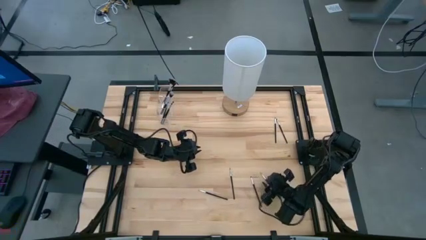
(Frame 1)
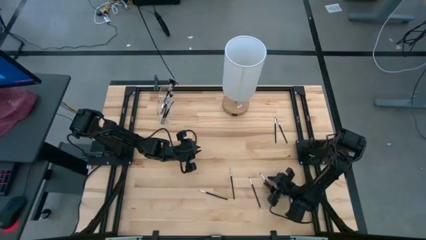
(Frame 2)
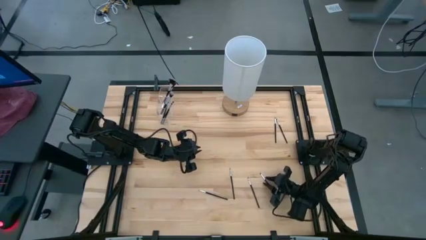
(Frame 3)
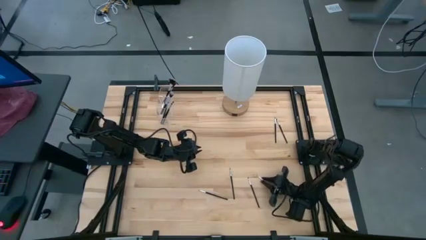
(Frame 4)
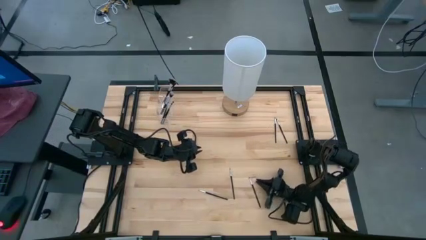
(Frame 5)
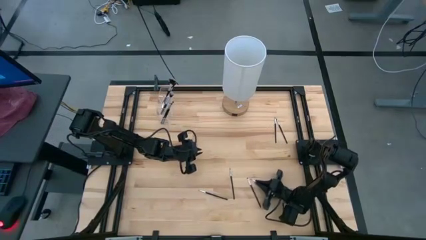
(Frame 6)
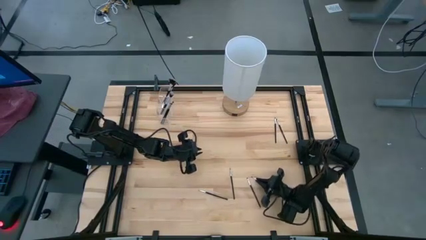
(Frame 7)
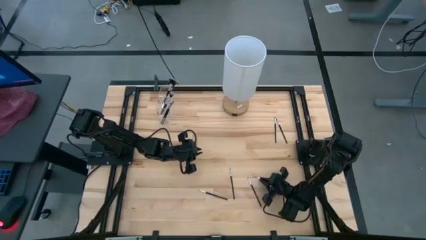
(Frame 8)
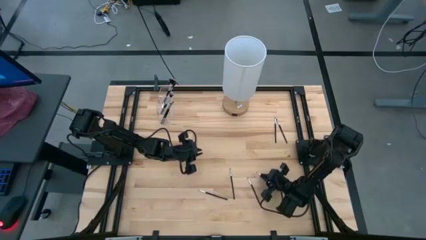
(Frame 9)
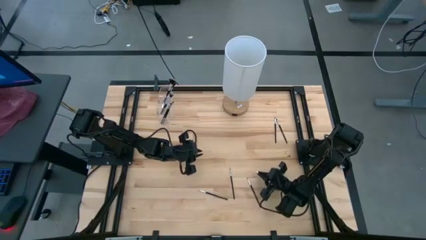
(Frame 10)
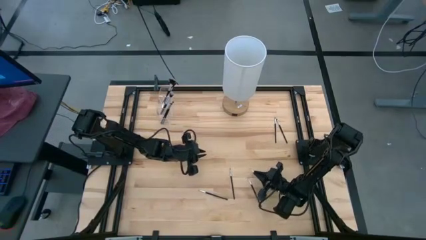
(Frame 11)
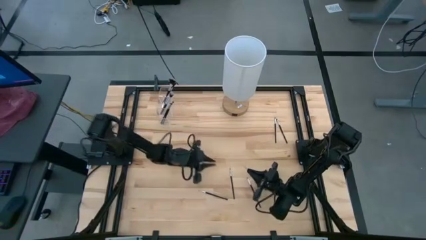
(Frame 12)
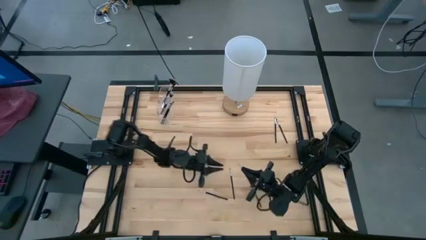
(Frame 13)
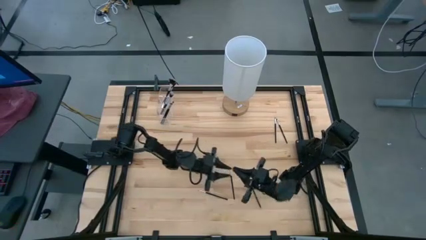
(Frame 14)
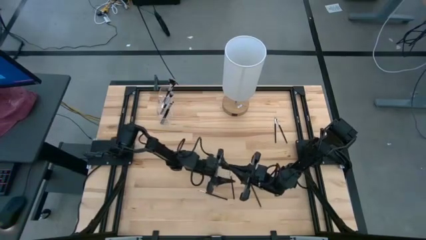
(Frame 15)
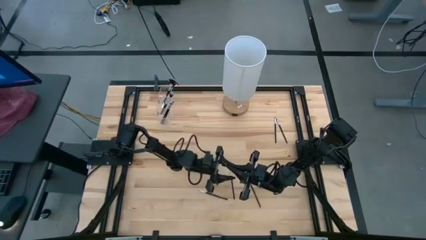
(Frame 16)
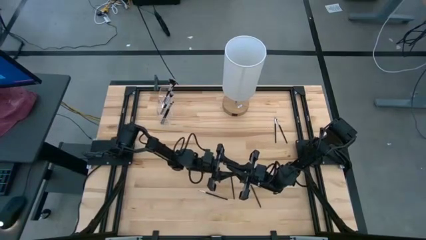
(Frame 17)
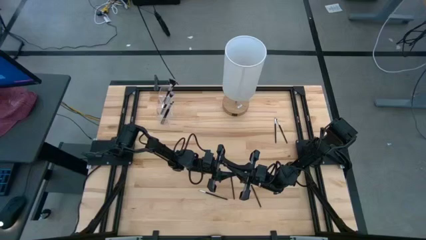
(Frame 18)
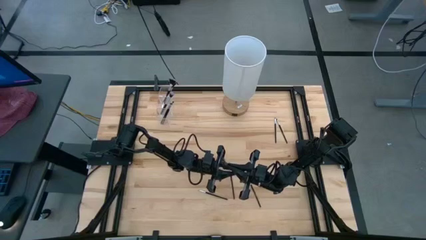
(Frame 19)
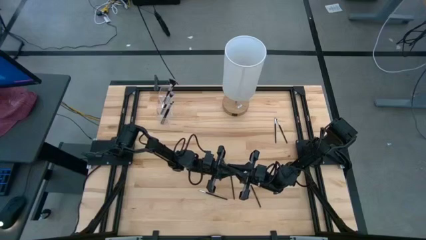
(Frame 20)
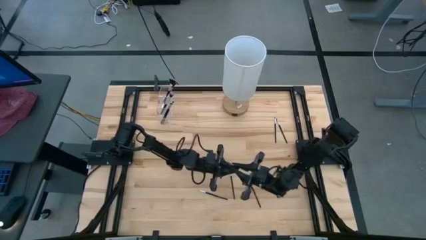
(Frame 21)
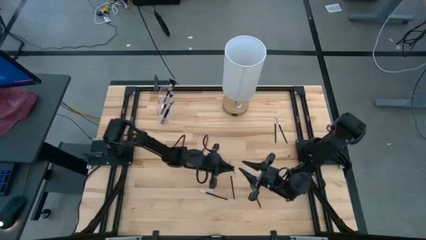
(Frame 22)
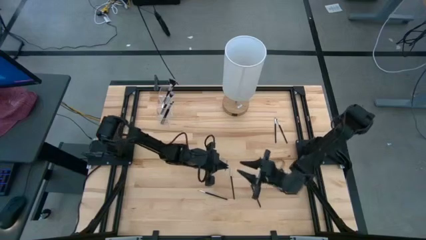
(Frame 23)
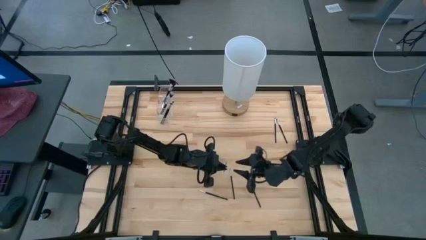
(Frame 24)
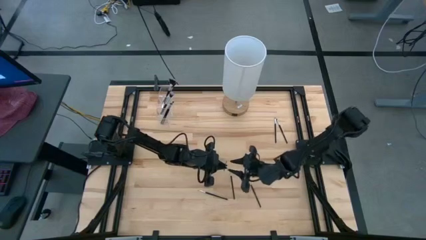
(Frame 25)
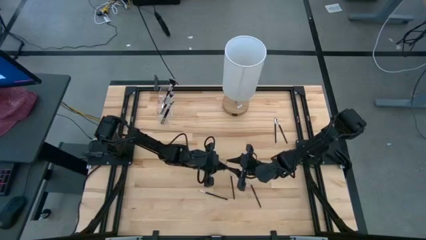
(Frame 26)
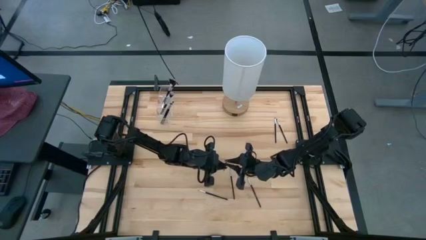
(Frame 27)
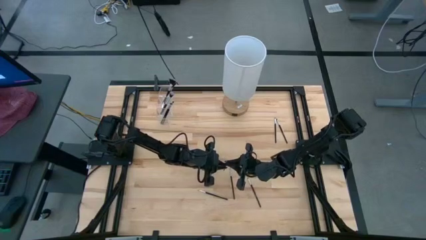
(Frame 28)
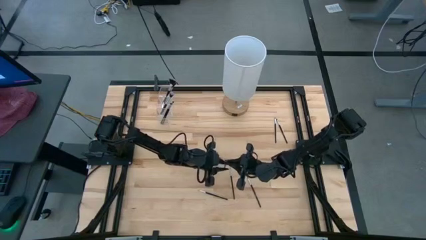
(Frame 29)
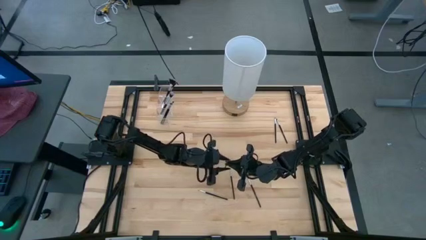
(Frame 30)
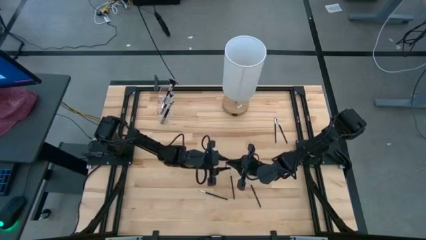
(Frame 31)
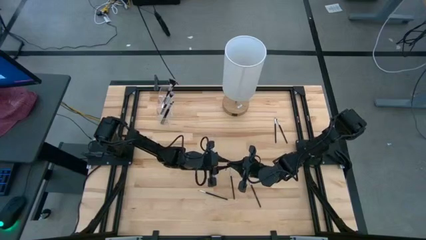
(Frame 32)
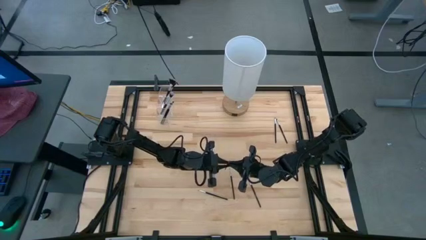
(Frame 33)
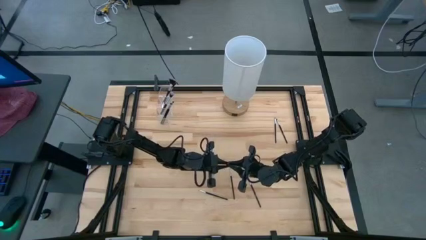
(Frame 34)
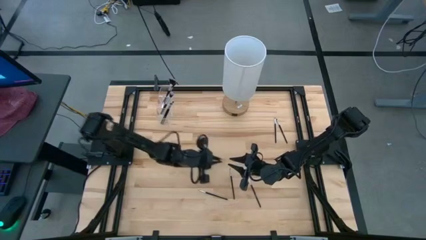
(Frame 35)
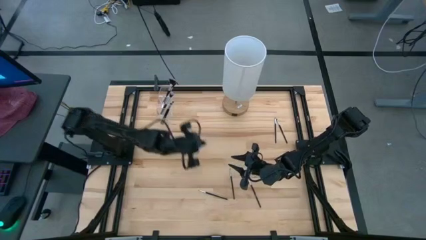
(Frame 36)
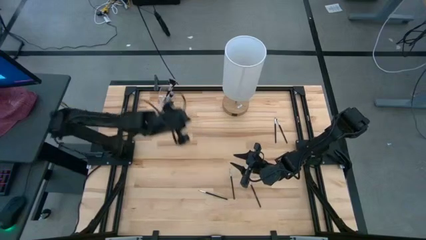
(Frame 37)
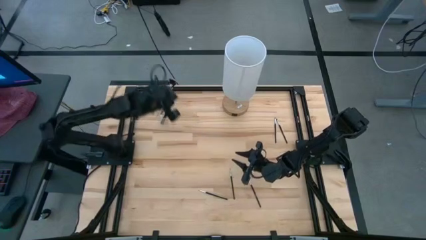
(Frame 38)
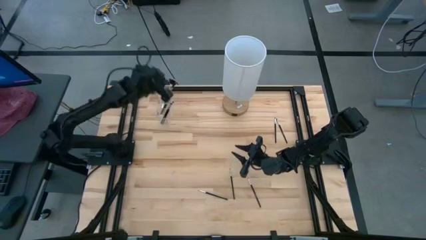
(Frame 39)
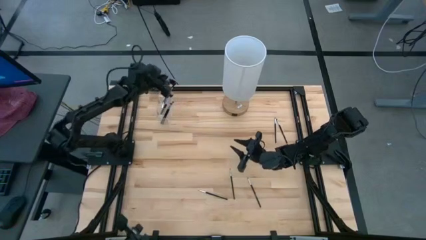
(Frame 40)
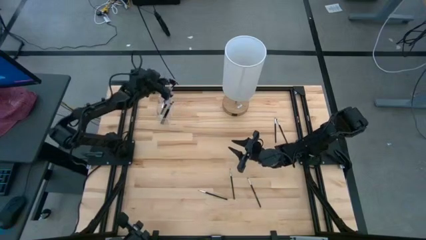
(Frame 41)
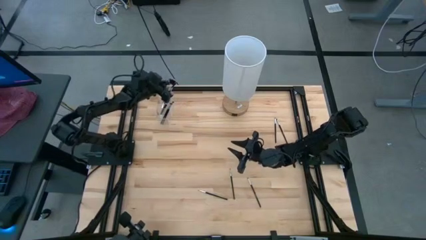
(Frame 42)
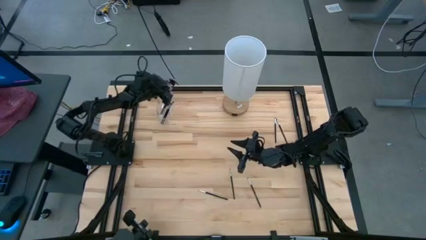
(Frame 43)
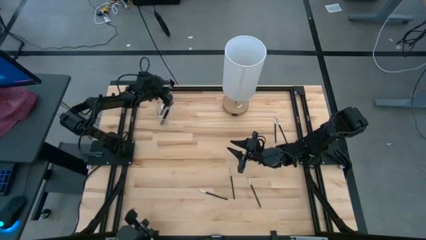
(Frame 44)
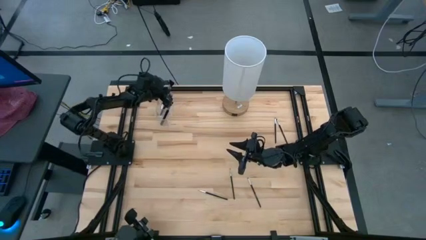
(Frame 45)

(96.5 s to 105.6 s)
Task: Put items in baskets/containers
Put the black eyeshadow brush into the transparent organizer

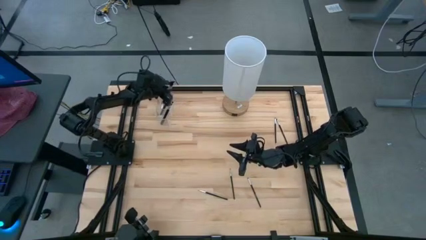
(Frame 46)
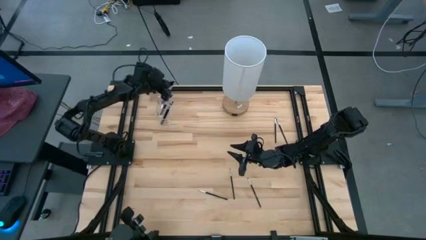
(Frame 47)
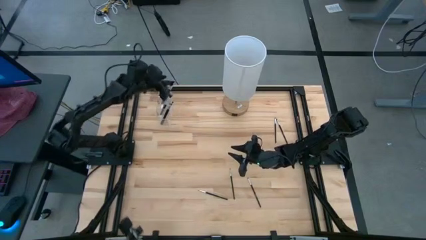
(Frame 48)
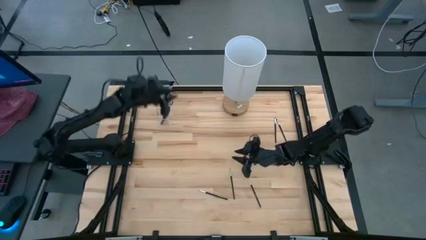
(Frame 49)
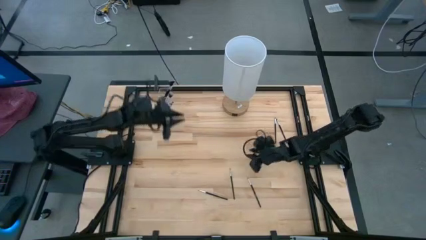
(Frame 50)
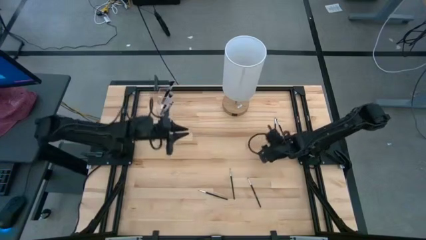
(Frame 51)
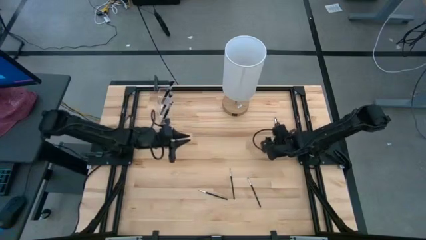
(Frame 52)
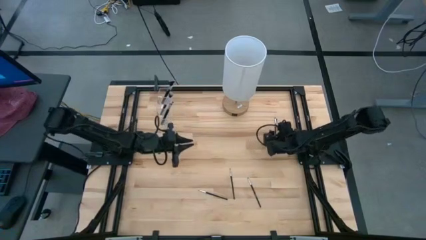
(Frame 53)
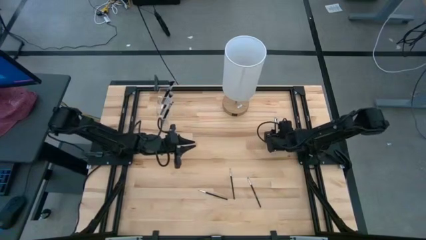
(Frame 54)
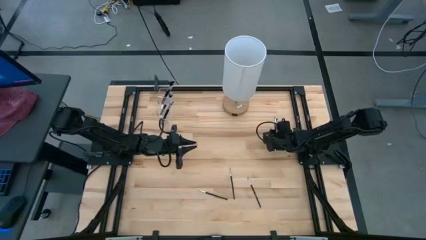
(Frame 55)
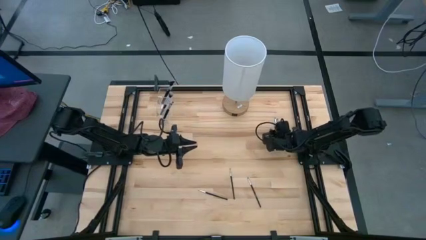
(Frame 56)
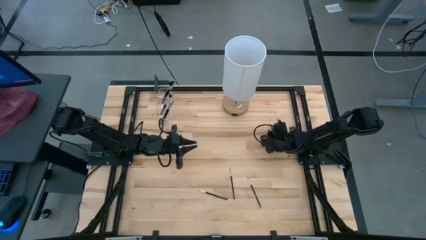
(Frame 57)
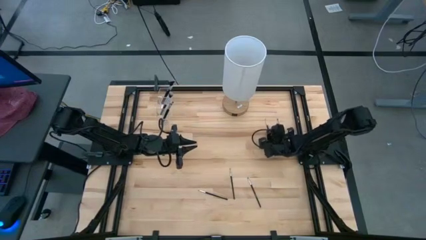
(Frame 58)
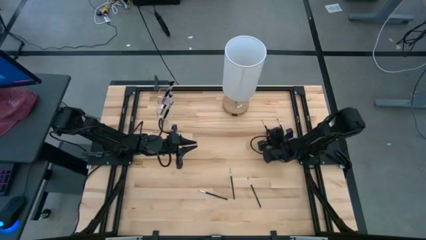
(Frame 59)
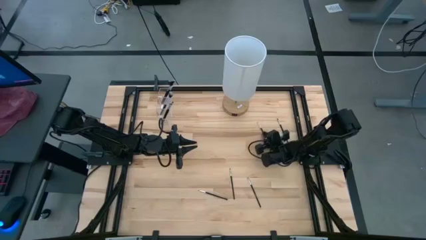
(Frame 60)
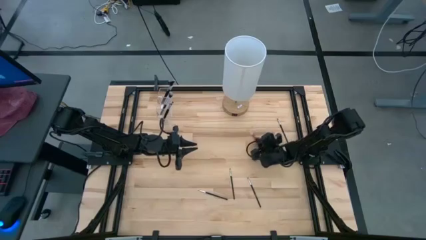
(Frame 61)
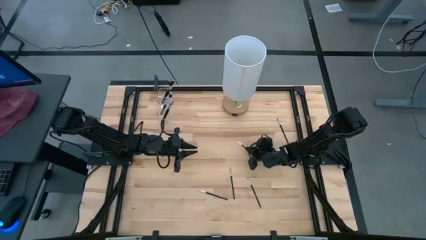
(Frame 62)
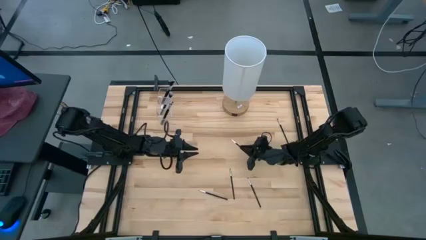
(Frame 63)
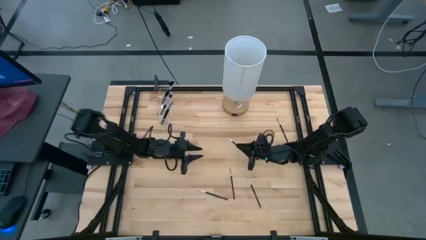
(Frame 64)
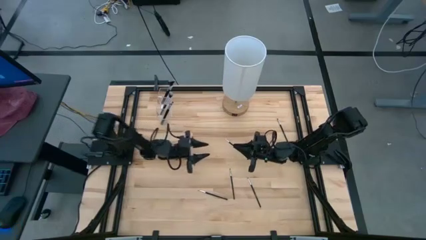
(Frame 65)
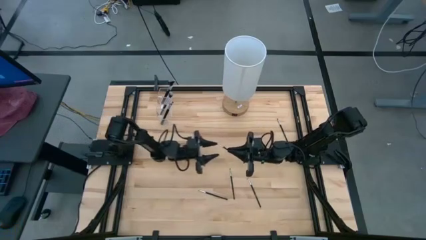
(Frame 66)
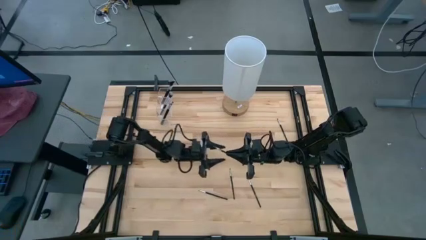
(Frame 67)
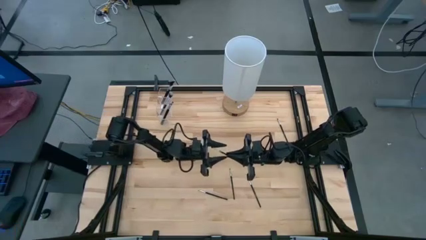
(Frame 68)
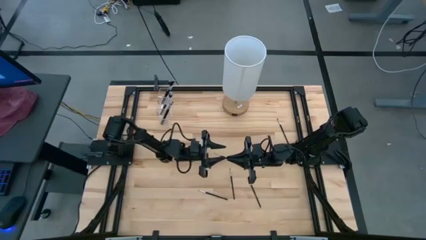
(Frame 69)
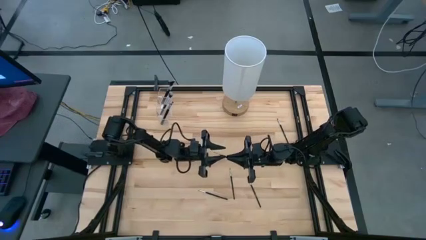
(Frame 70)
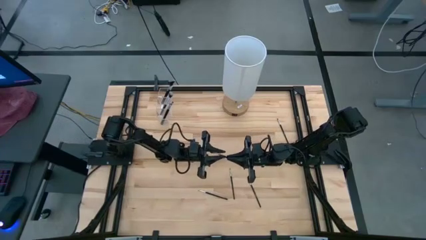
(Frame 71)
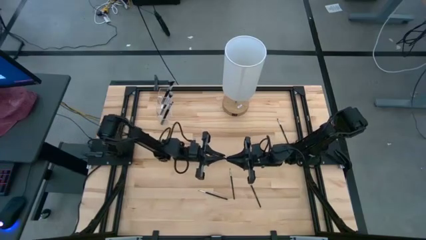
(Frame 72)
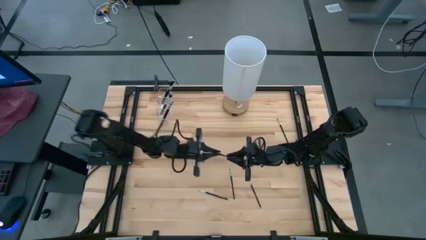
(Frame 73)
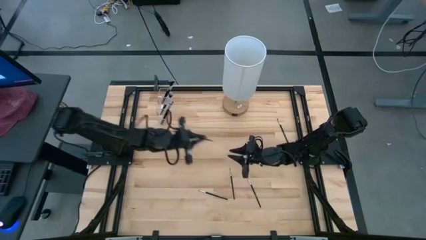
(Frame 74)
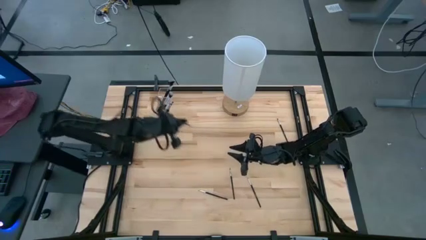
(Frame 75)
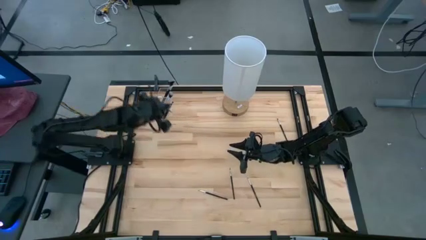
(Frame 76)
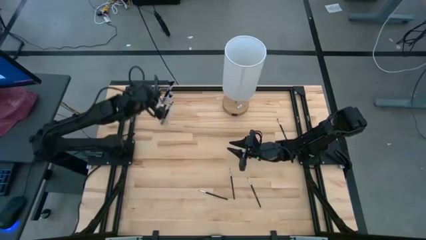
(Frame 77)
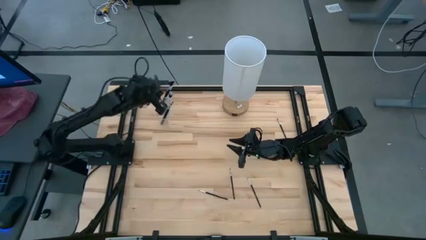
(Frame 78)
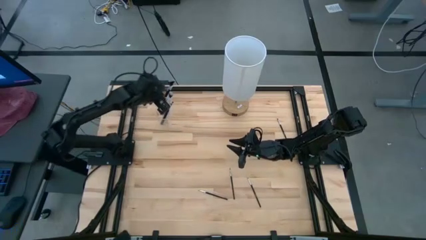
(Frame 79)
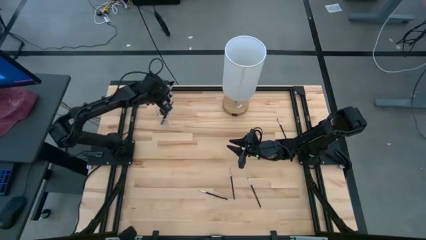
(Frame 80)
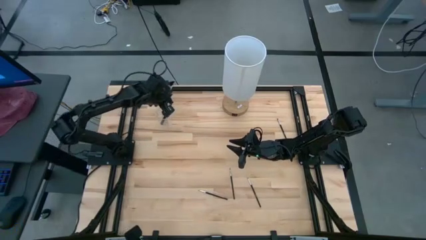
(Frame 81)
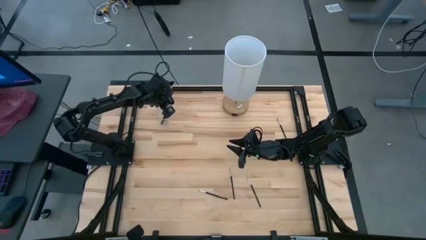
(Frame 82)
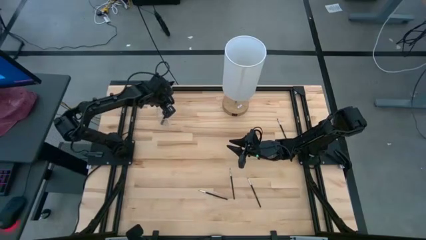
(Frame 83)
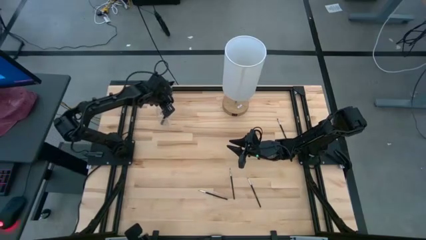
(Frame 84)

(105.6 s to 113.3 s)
Put the black eyeshadow brush into the transparent organizer
